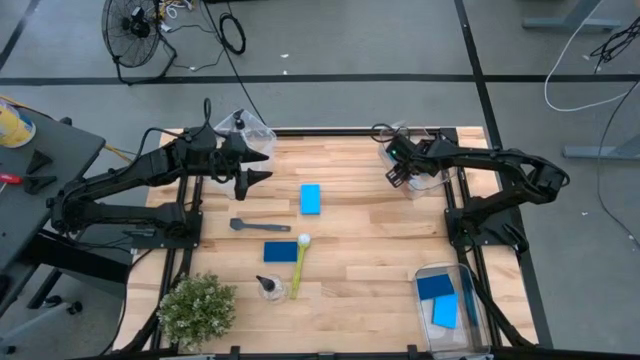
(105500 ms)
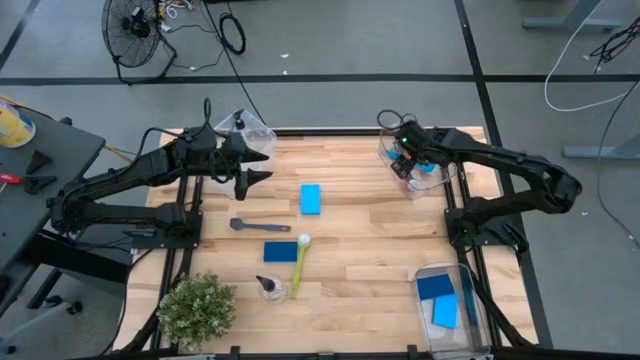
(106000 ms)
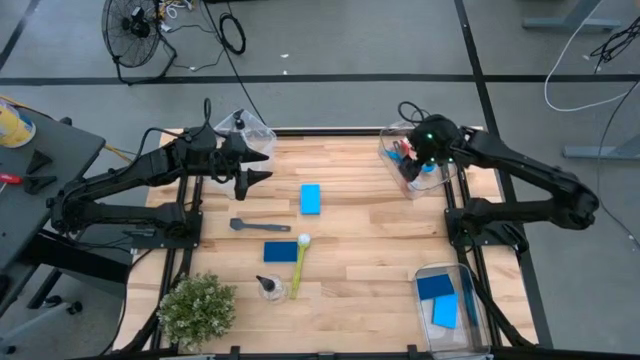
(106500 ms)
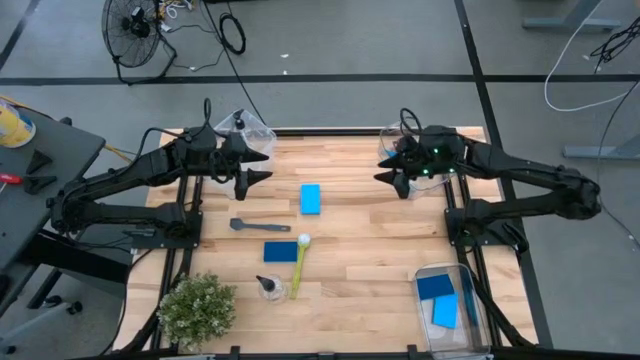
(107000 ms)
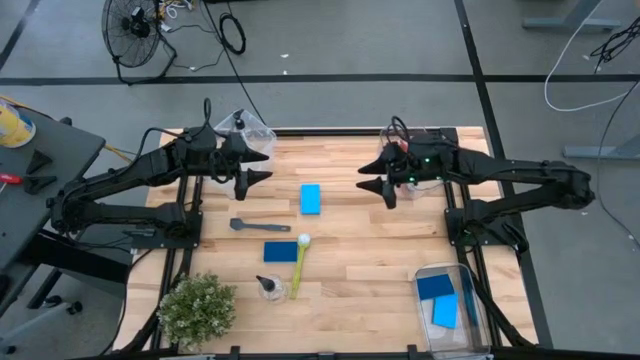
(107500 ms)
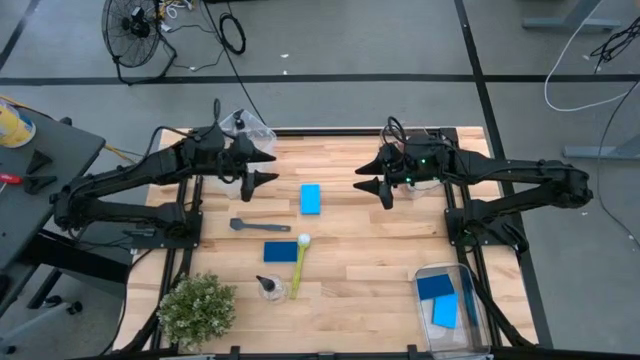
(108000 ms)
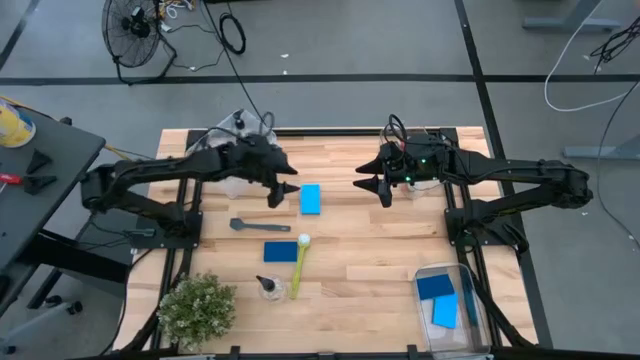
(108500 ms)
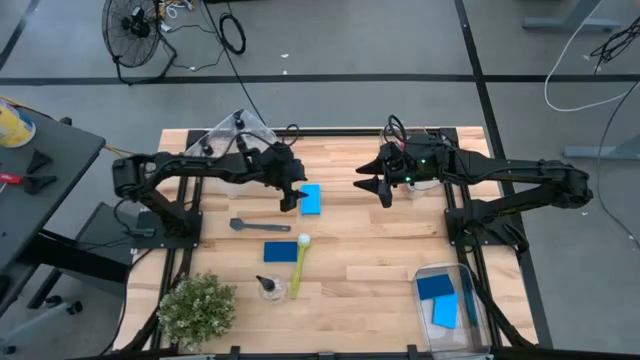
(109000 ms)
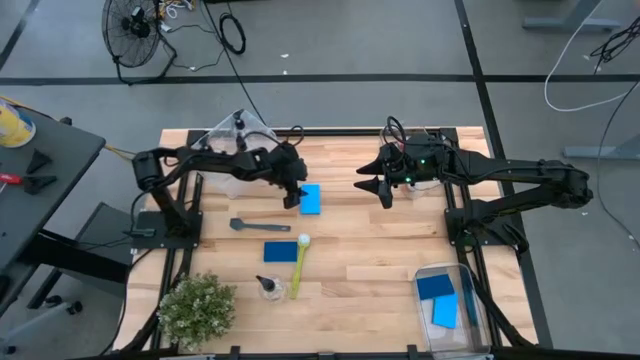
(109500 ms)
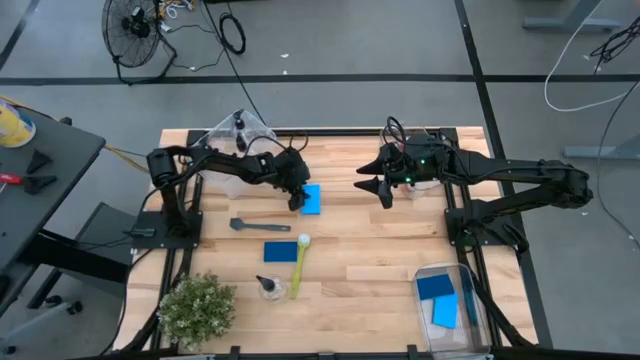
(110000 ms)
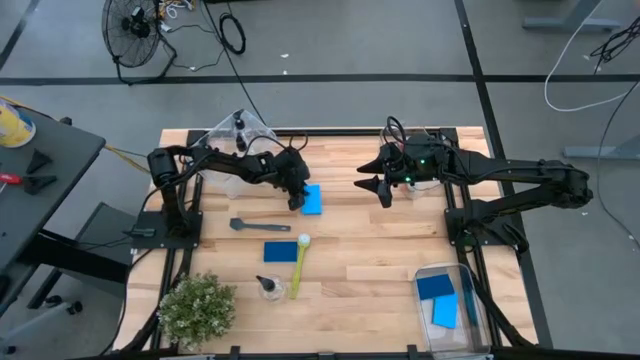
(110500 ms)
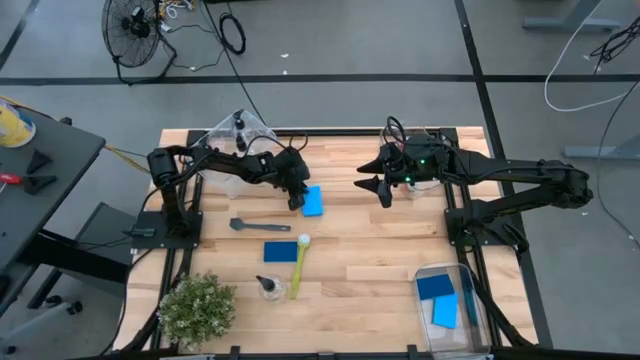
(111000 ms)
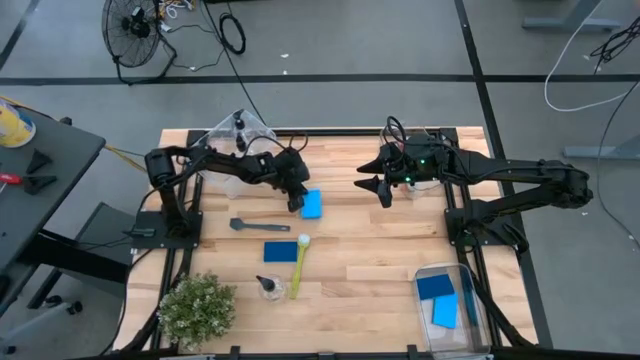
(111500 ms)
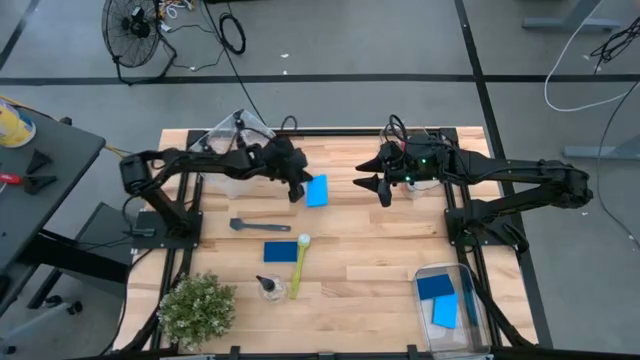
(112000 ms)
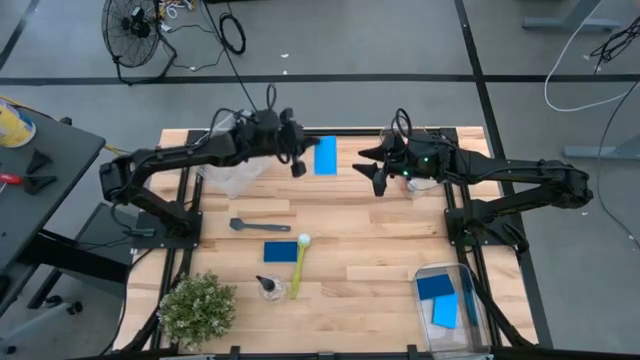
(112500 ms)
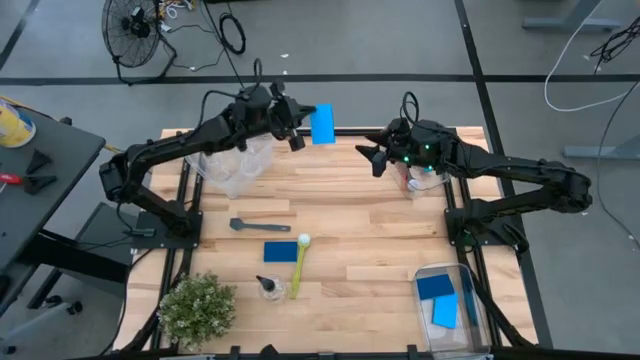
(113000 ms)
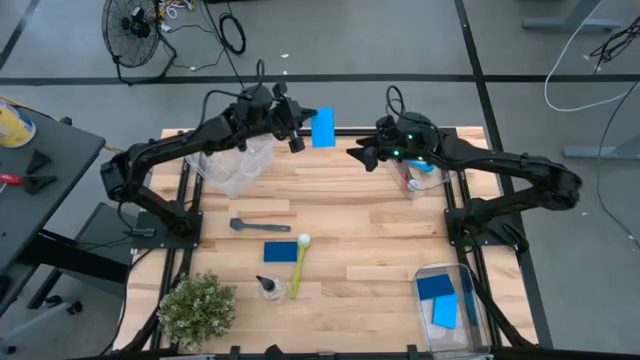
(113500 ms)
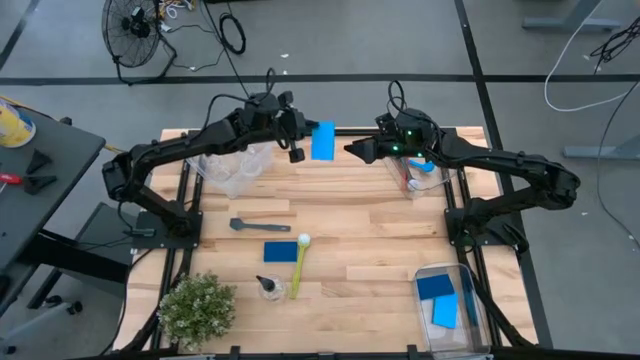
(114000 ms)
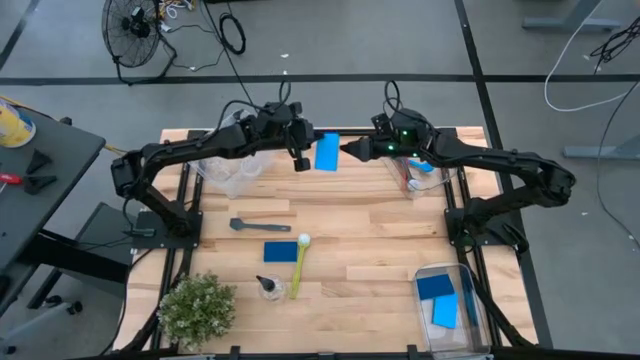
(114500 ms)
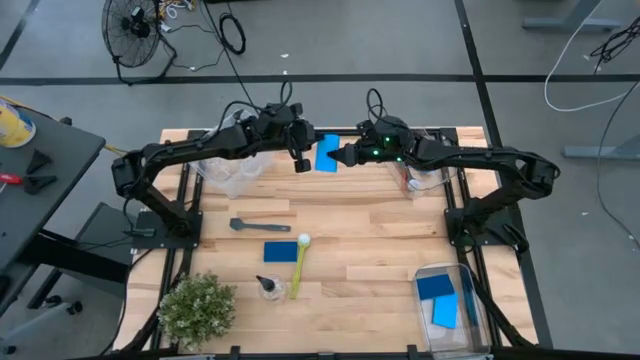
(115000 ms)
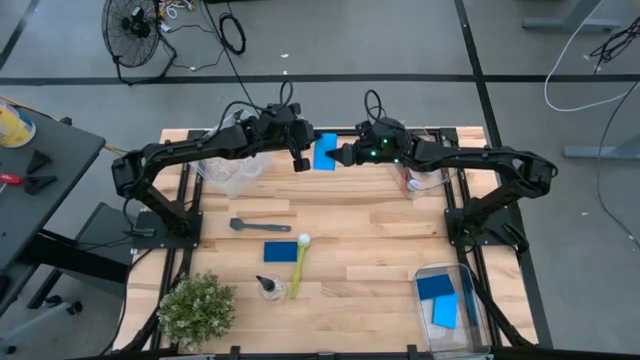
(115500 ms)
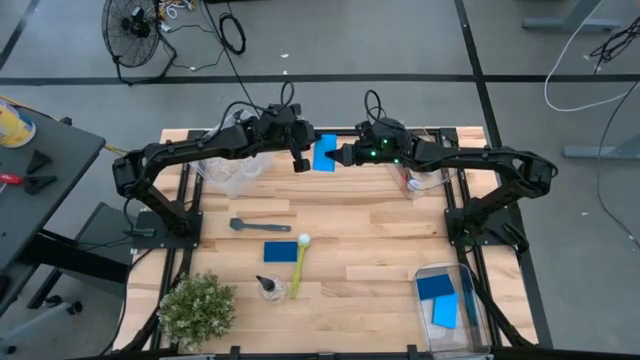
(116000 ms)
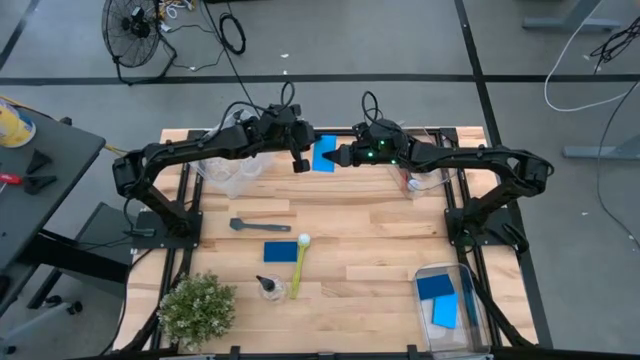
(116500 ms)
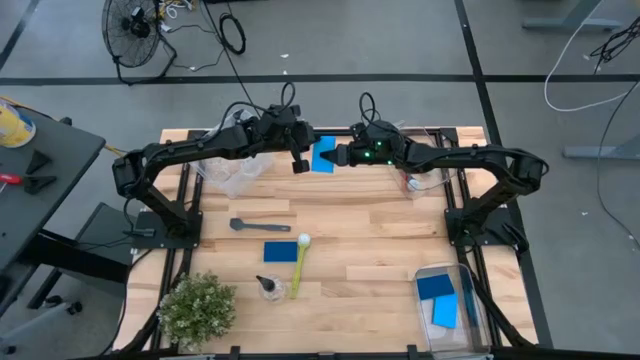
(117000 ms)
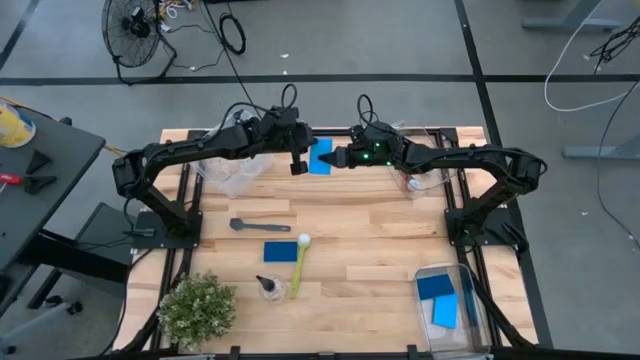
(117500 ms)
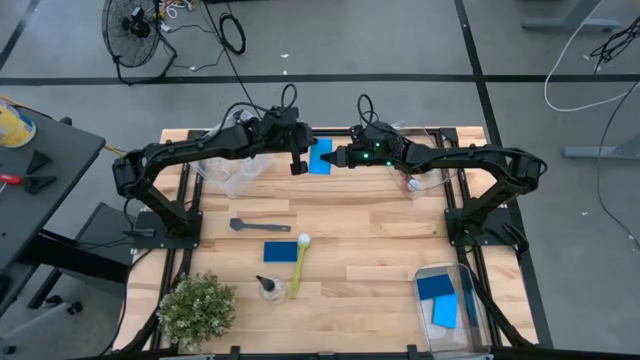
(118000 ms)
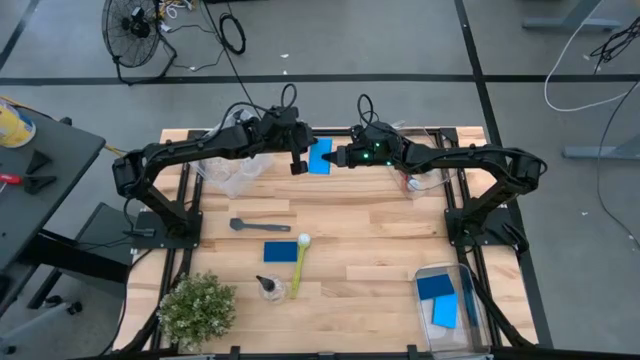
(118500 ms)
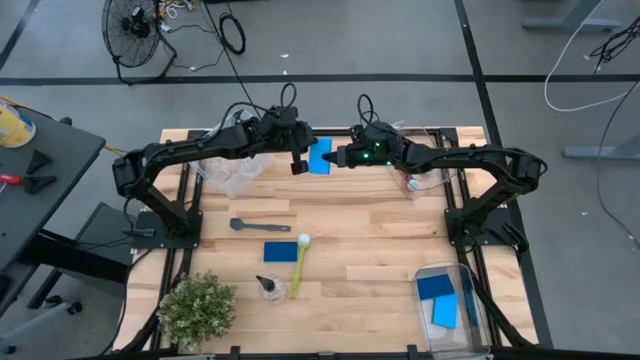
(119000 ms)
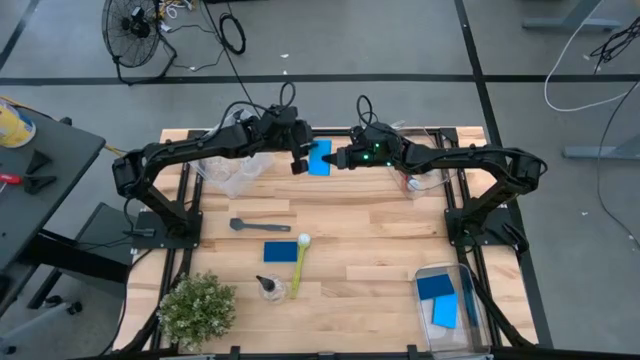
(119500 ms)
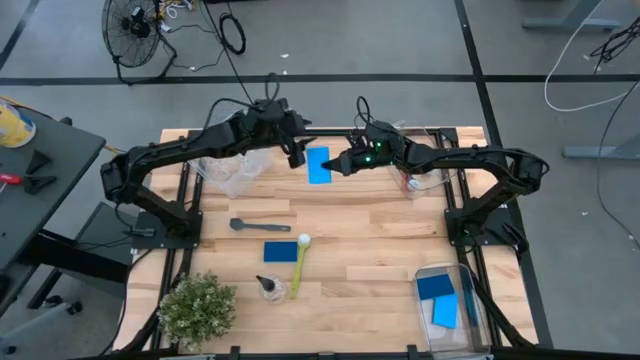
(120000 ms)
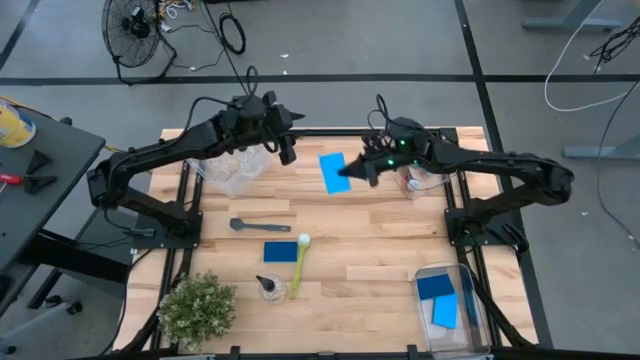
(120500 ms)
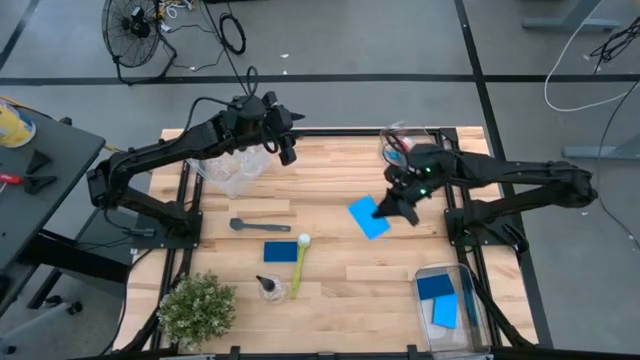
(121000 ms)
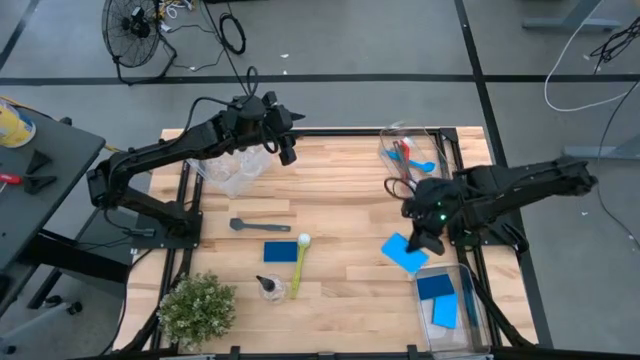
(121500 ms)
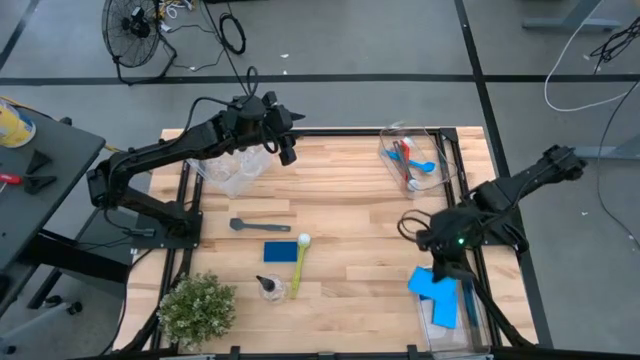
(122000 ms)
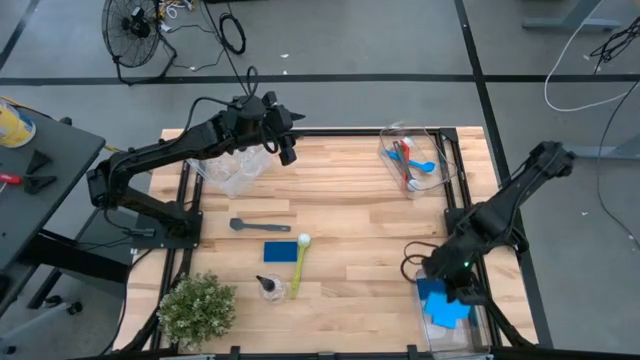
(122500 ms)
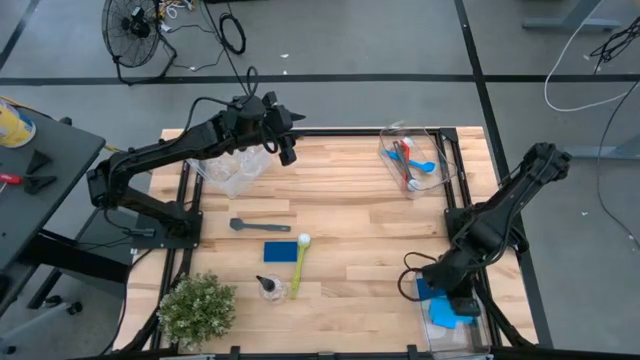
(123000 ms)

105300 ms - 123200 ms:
Task: Pick & Place Kitchen Sink Supplies
Put the light blue sponge into the bottom transparent bin

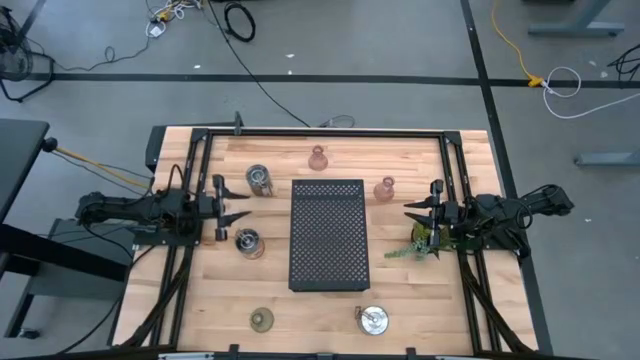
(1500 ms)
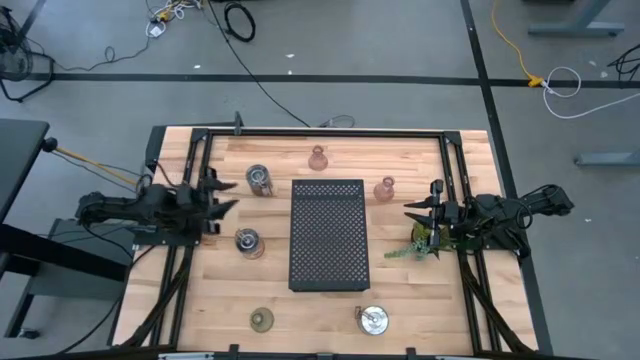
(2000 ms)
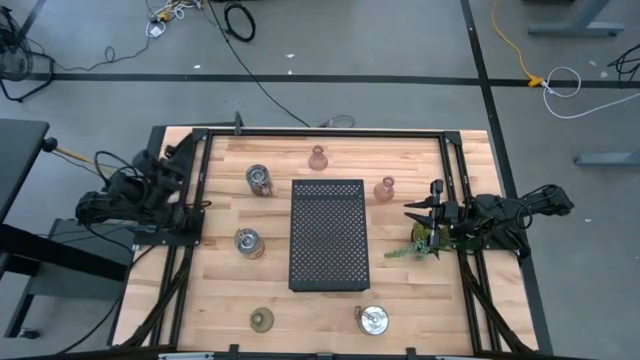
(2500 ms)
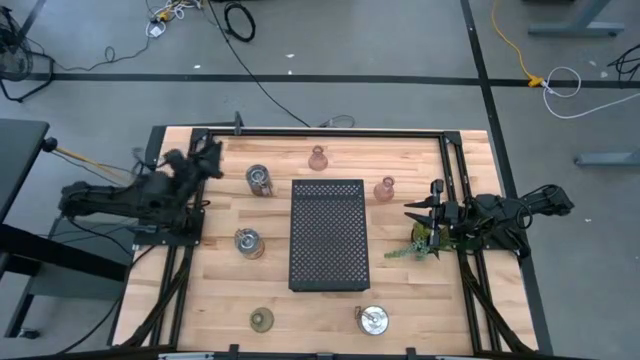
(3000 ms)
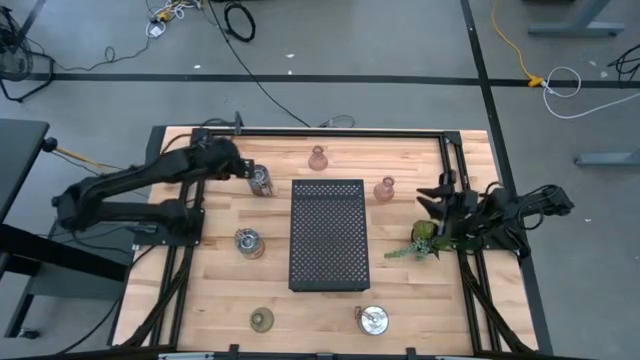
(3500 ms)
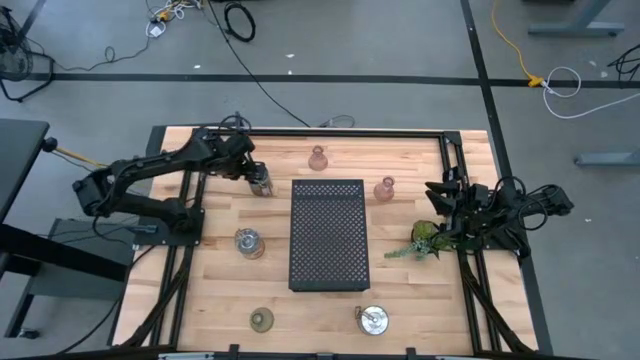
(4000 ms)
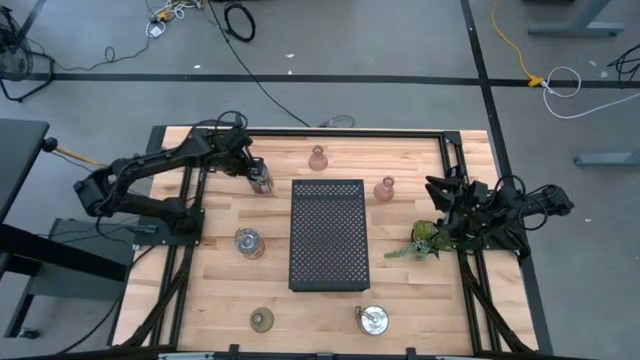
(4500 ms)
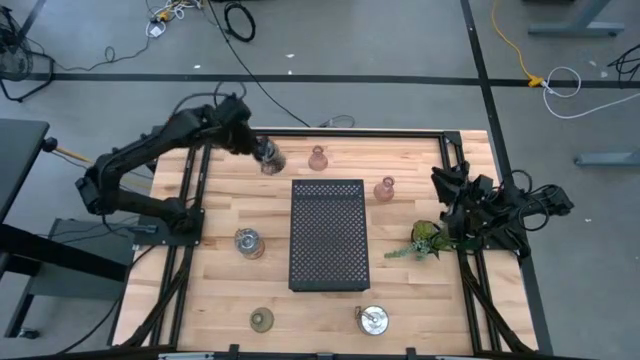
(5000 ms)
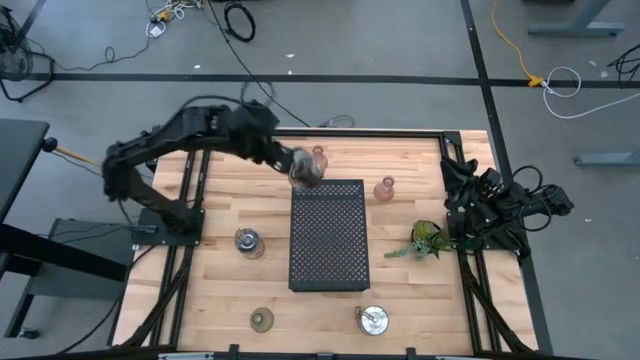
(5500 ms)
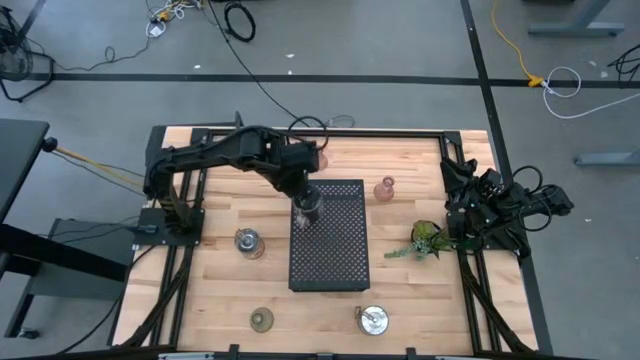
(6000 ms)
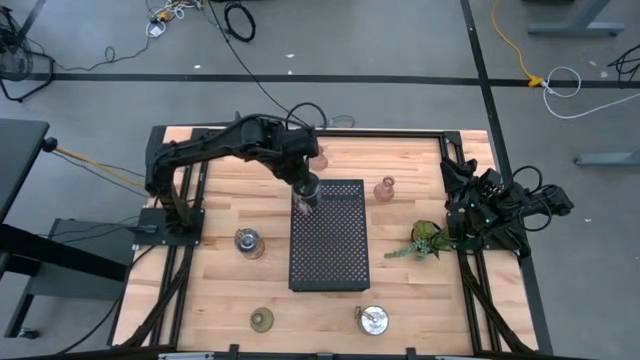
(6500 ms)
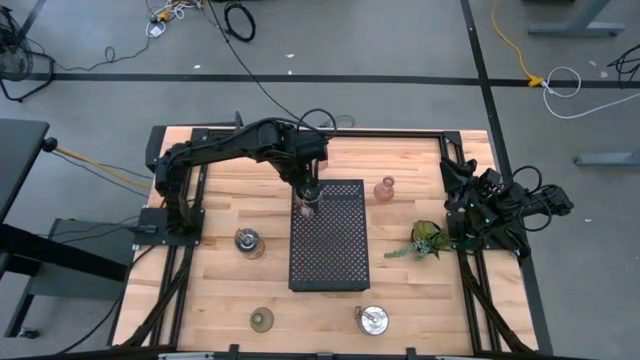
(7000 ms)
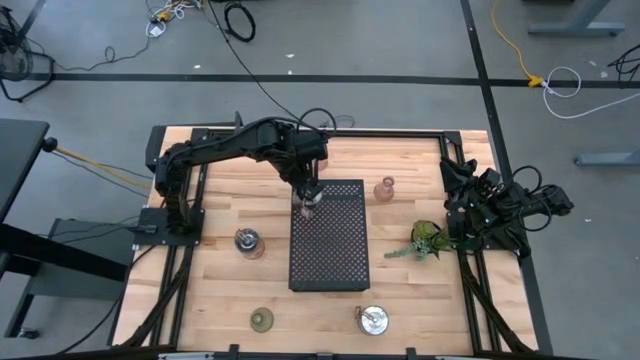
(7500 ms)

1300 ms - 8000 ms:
Task: Pick & Place candle stick holders
Put the top brown scented candle on the shelf
